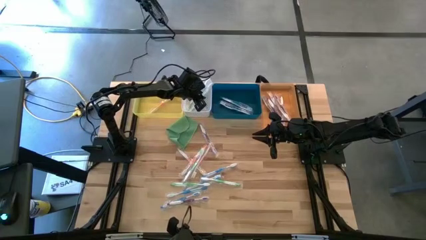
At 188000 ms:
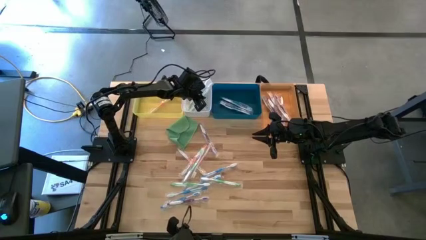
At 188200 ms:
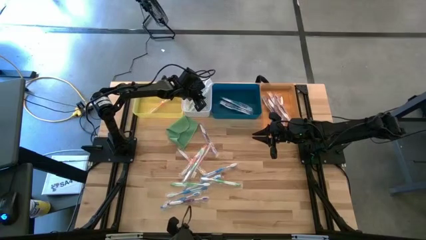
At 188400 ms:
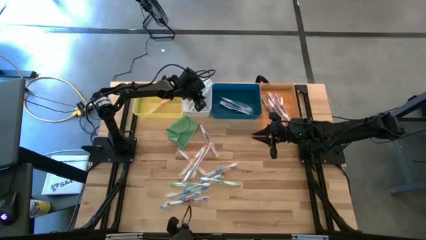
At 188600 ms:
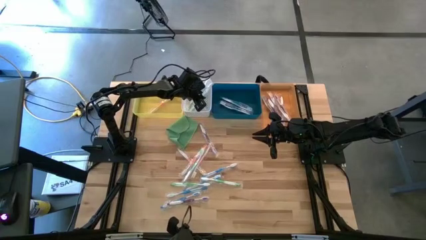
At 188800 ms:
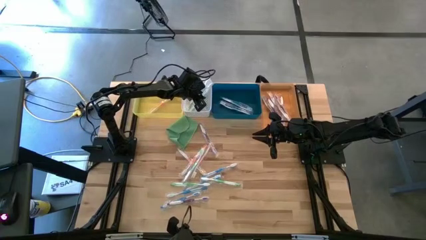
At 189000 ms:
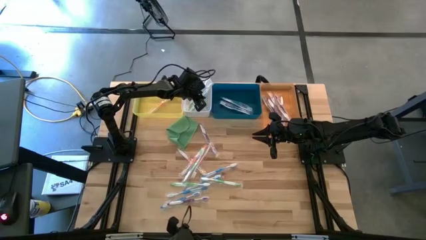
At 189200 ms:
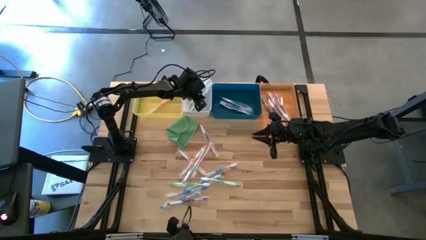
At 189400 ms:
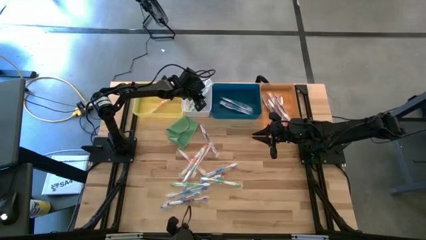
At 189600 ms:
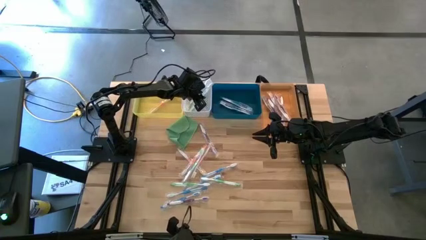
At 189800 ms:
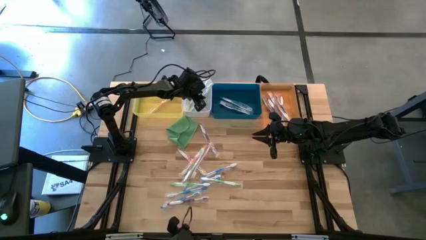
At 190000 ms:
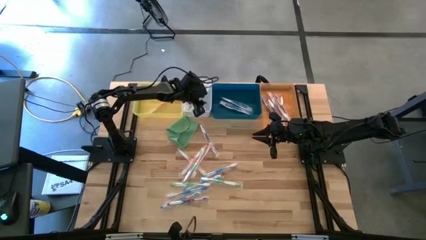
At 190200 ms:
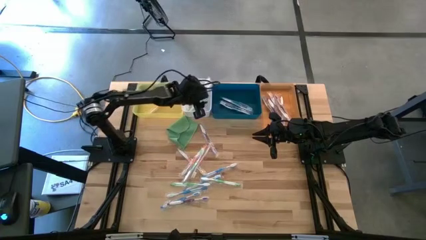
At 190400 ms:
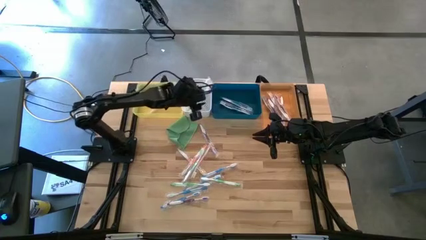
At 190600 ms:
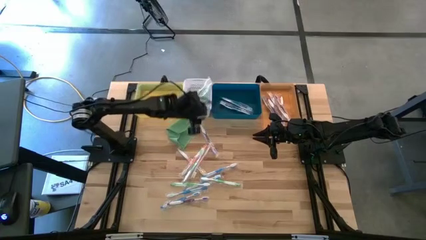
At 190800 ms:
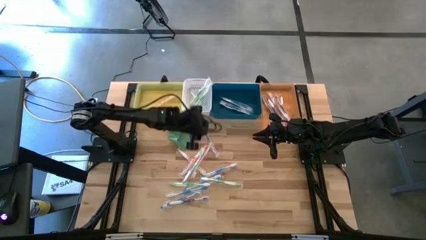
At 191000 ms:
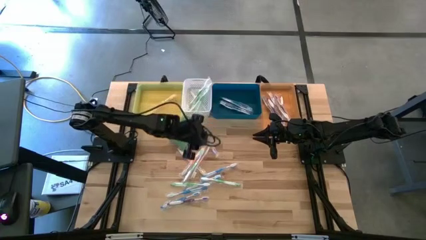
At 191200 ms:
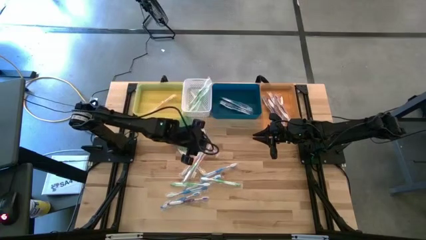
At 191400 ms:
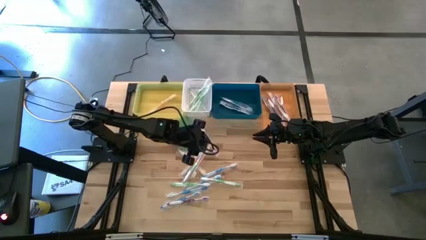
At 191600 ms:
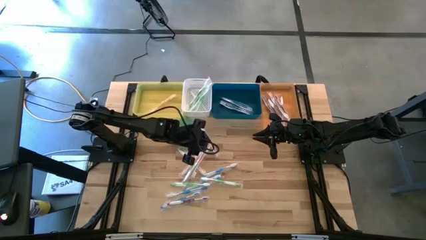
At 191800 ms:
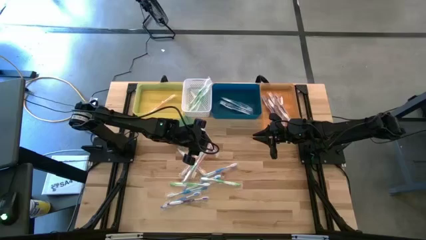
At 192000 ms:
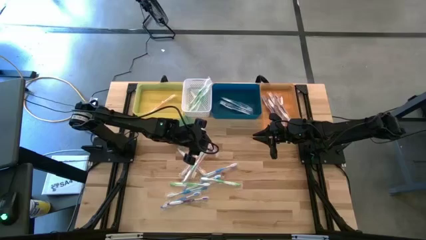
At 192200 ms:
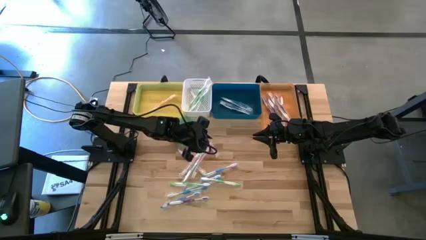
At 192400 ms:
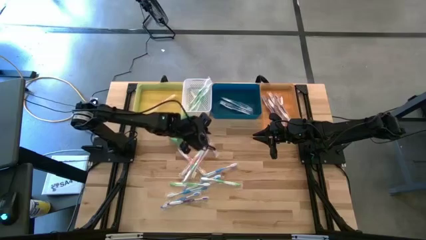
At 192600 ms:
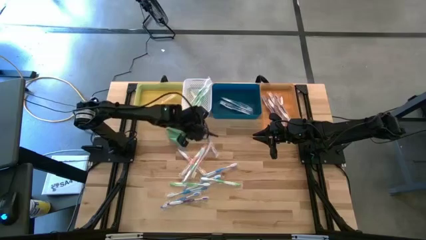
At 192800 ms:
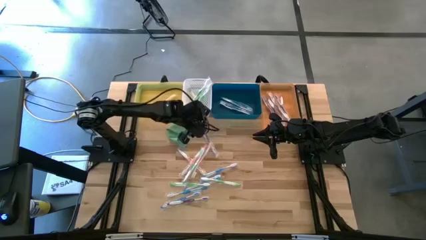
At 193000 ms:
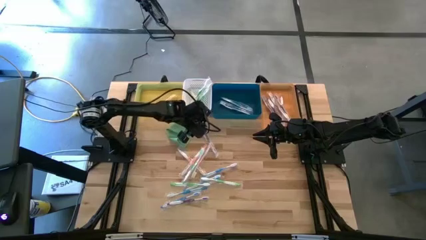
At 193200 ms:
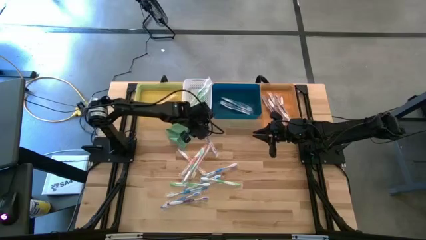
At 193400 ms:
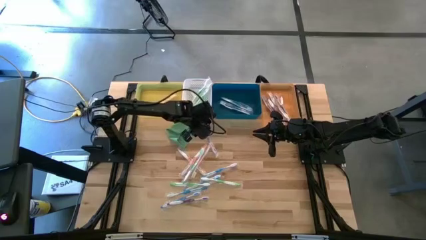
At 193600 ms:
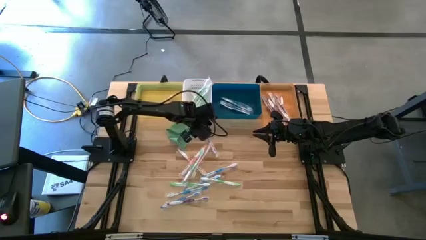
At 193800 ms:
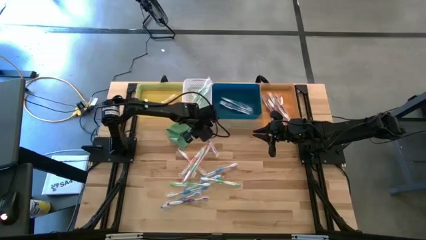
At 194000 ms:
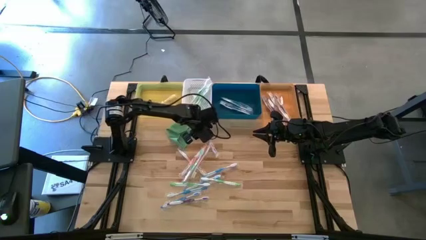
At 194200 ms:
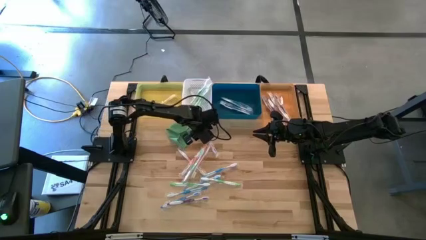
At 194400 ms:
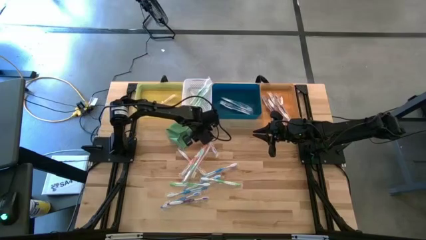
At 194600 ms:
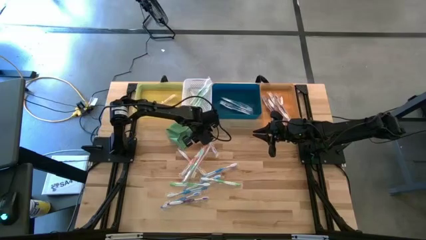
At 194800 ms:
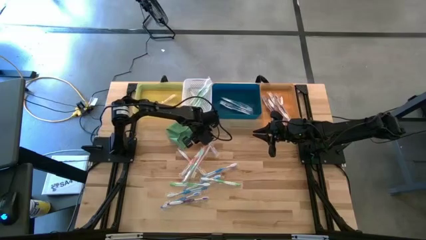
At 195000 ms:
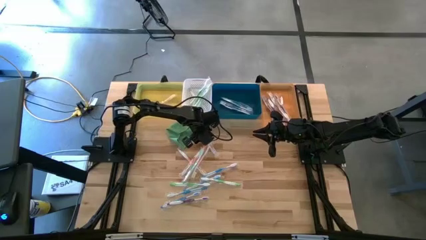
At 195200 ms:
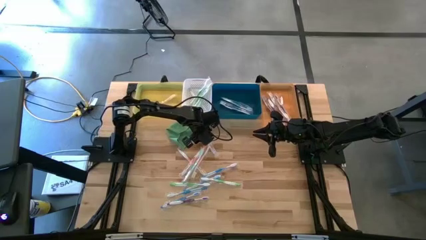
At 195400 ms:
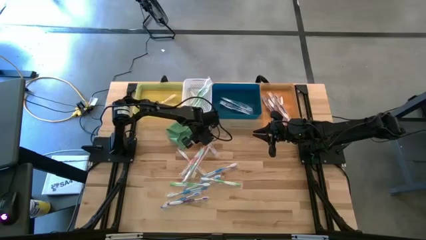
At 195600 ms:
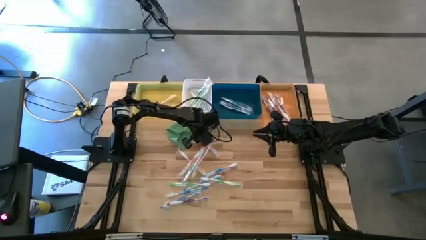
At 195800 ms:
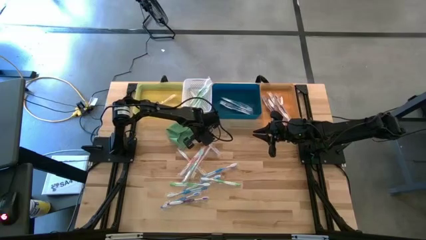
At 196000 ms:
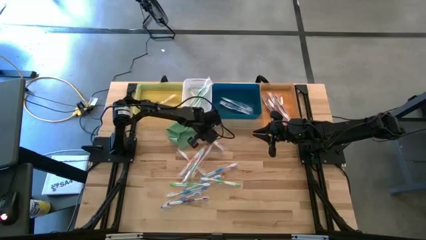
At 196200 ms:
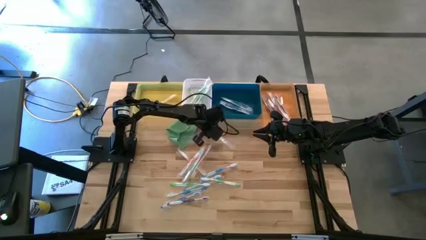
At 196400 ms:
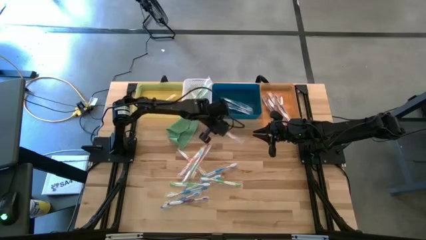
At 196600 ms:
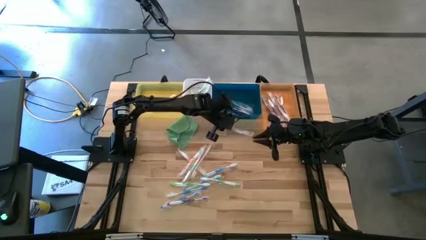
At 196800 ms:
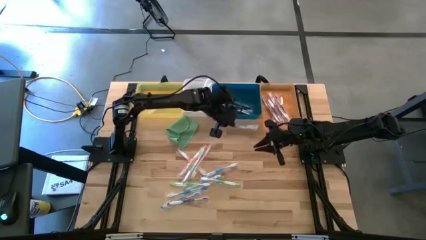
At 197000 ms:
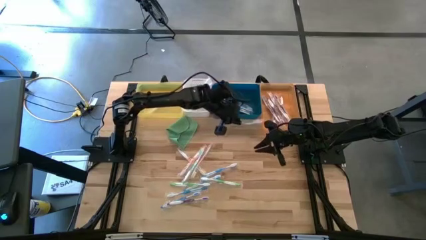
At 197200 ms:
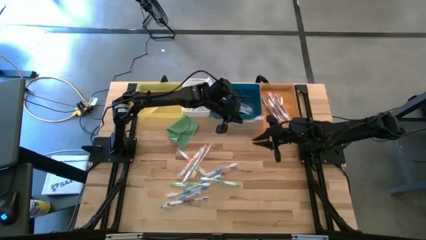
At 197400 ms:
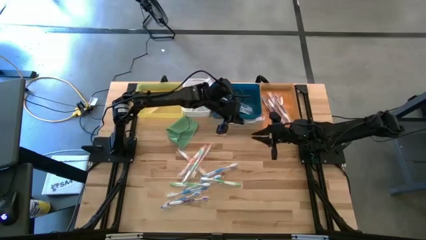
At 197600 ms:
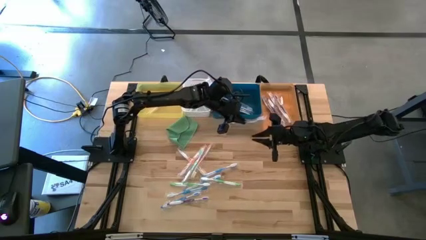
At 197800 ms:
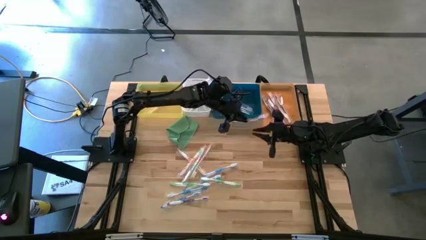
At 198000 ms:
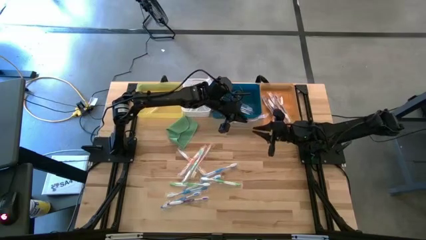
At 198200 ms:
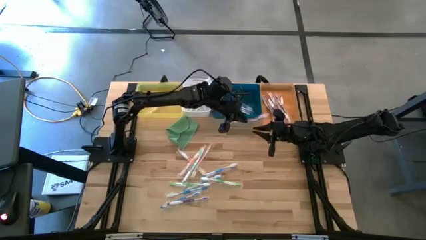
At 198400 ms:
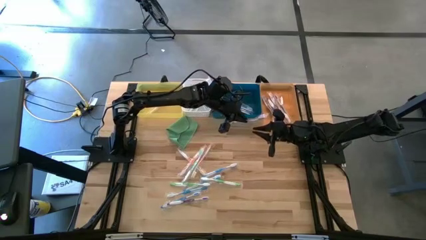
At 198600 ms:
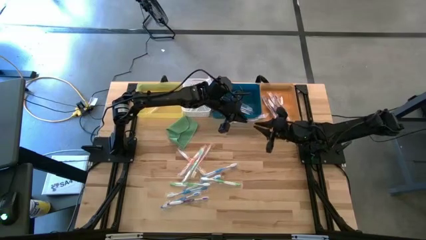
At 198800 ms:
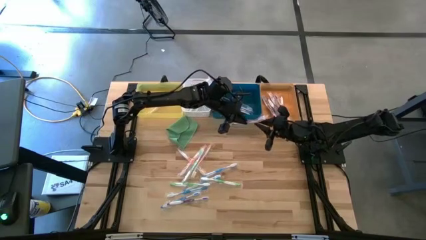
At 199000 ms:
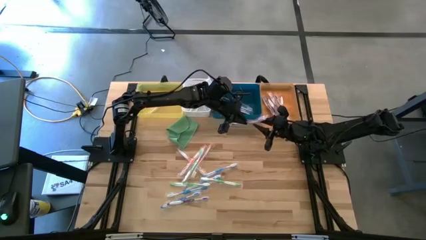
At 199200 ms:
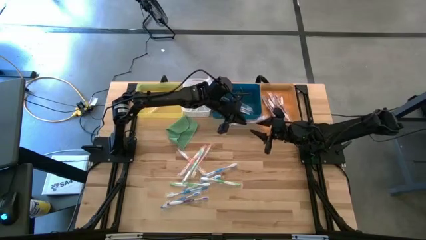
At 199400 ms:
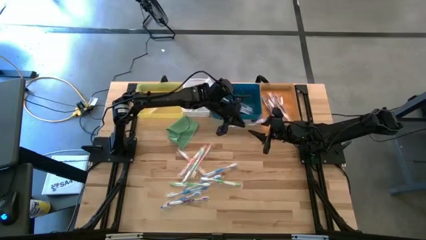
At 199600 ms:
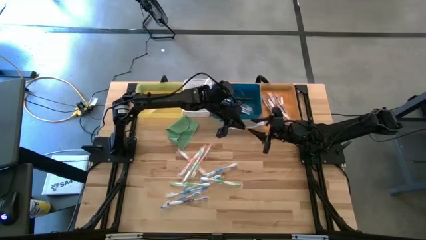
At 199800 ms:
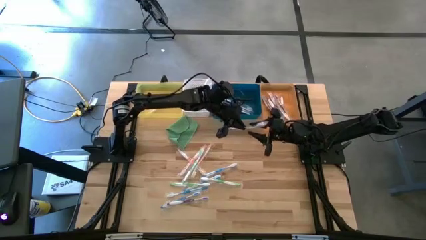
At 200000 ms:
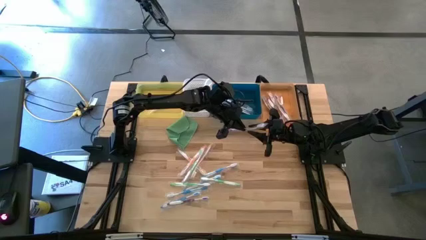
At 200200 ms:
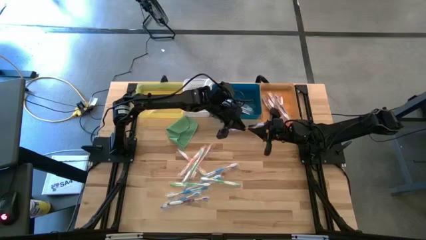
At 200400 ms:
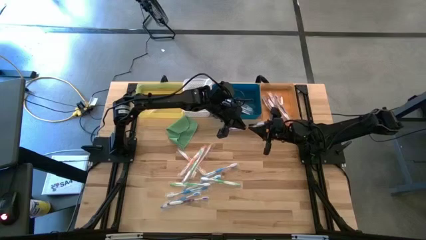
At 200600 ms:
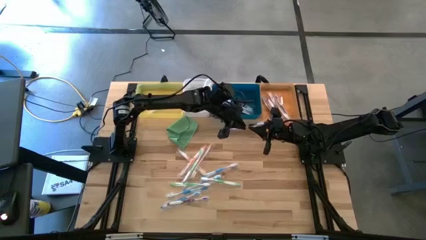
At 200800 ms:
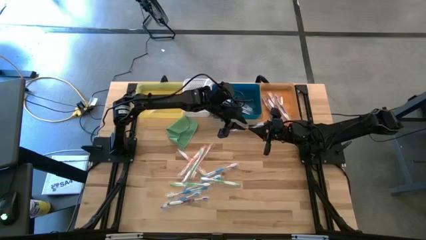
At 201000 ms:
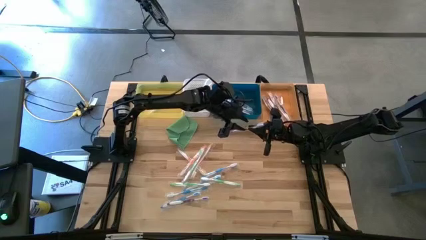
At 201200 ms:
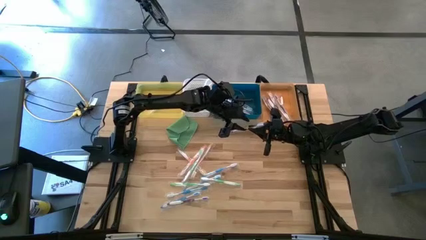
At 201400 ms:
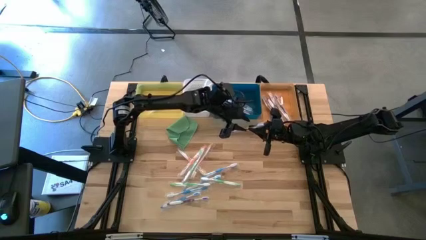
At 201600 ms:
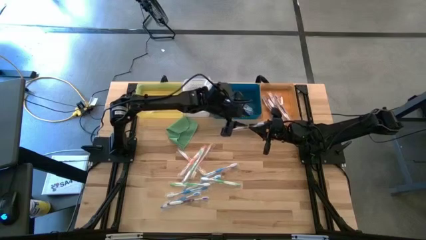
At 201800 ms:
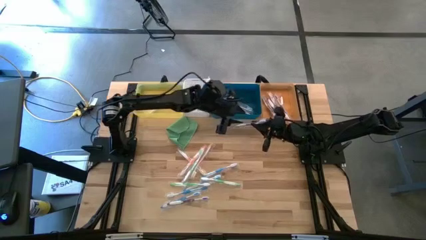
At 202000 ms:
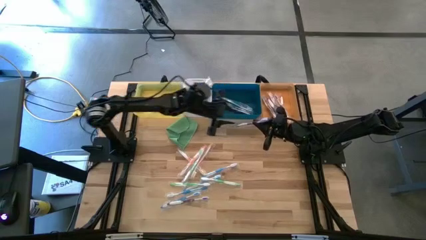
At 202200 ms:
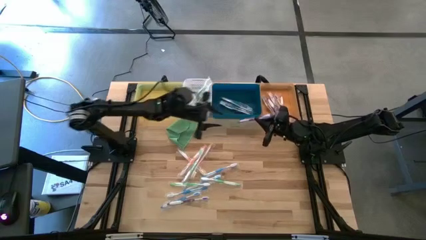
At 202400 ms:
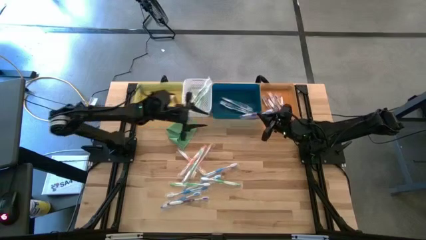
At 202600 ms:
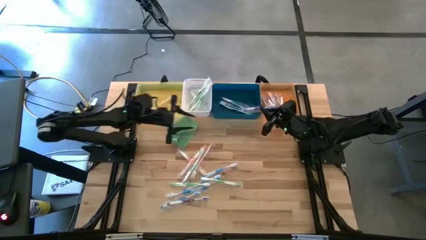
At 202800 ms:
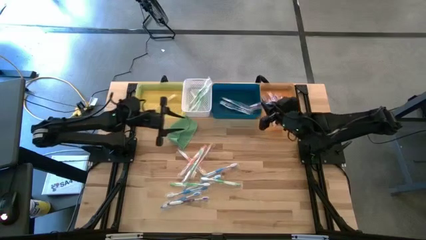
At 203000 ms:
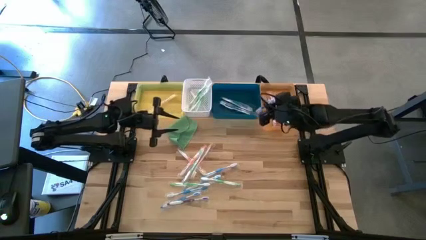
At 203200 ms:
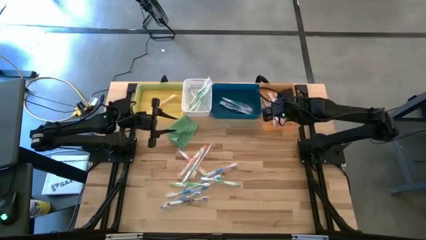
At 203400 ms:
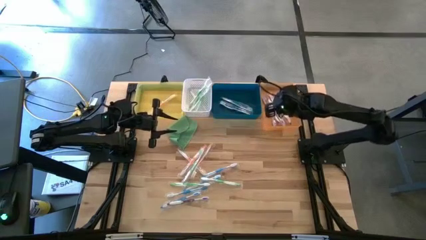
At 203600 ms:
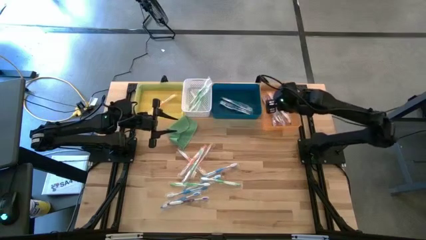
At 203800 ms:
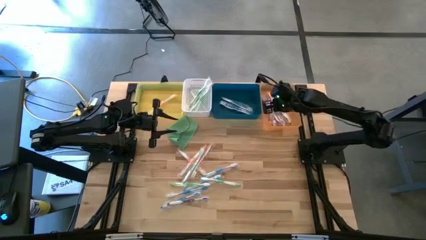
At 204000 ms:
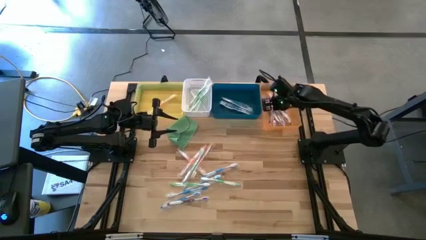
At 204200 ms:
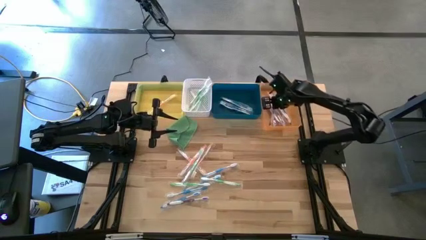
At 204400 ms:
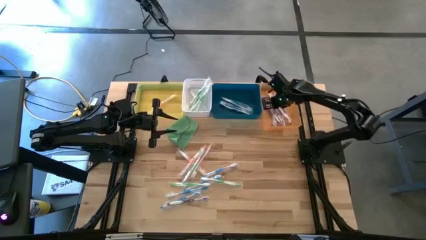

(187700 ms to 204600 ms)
Task: Pick & Place Toothbrushes
Put the violet toothbrush into the orange bin
